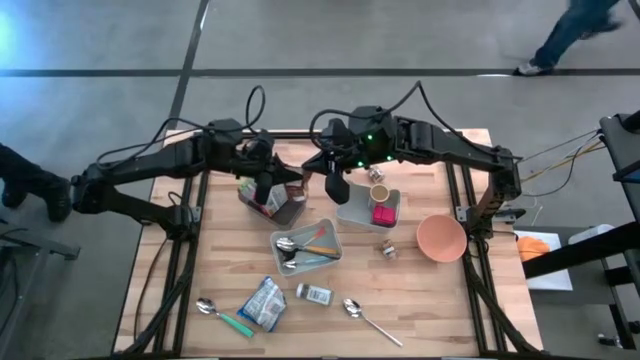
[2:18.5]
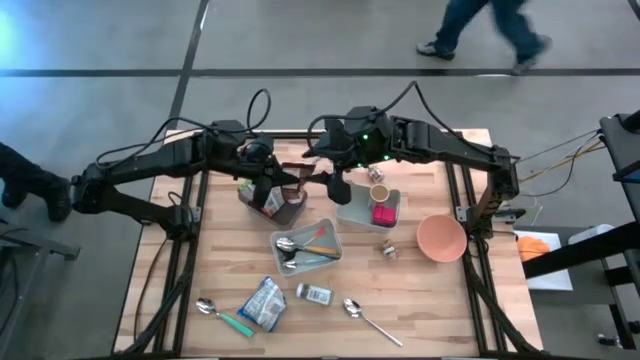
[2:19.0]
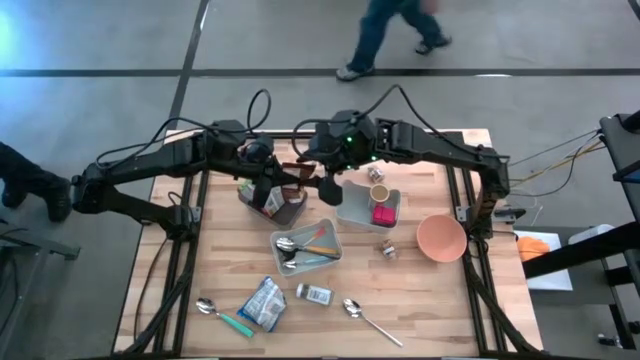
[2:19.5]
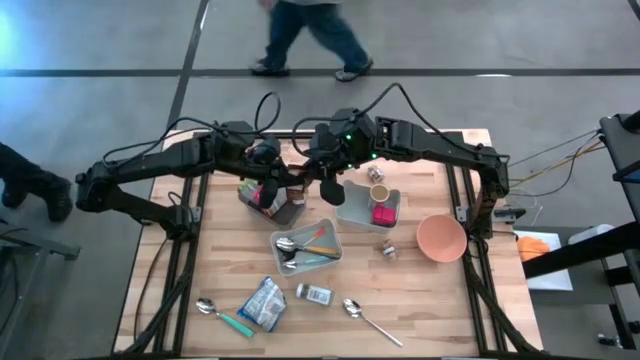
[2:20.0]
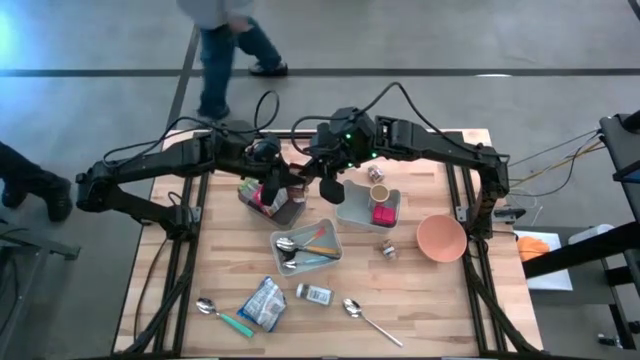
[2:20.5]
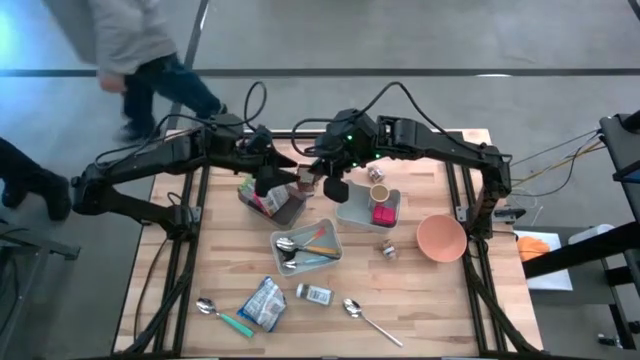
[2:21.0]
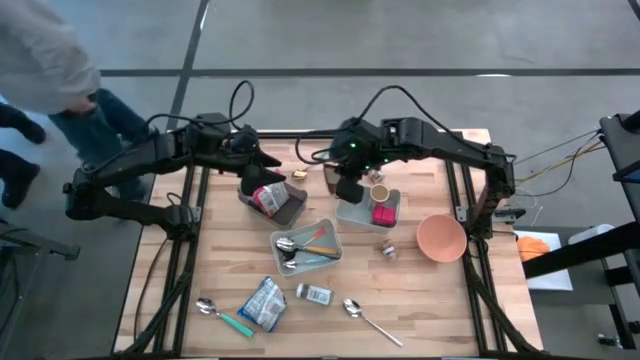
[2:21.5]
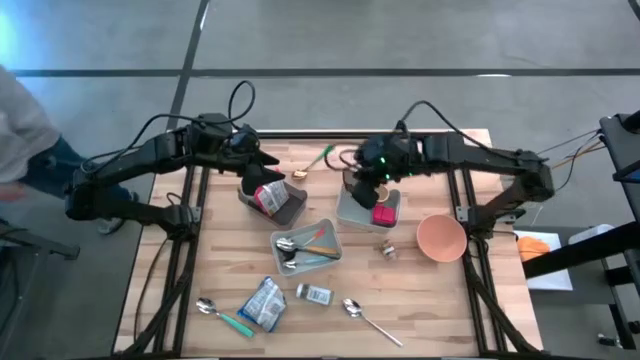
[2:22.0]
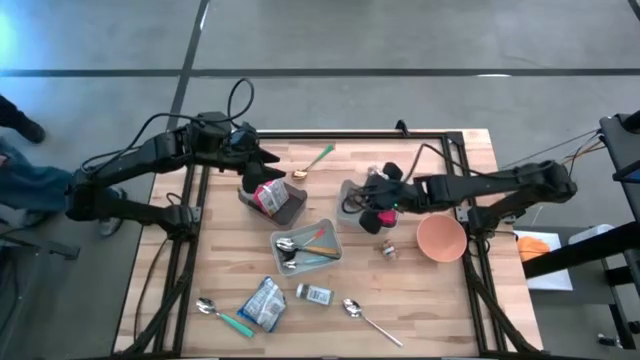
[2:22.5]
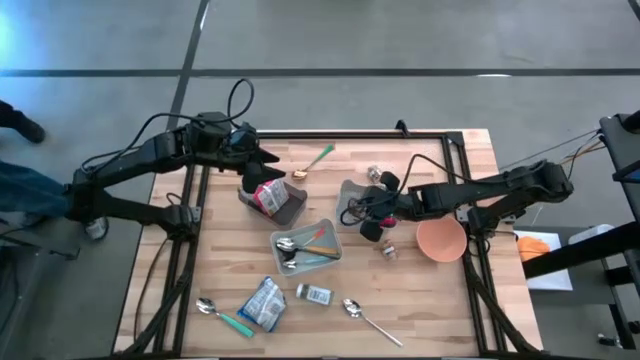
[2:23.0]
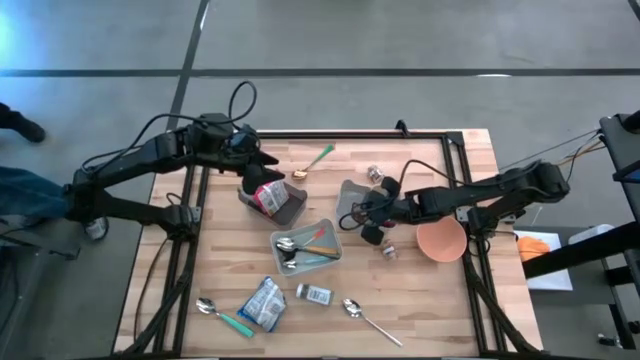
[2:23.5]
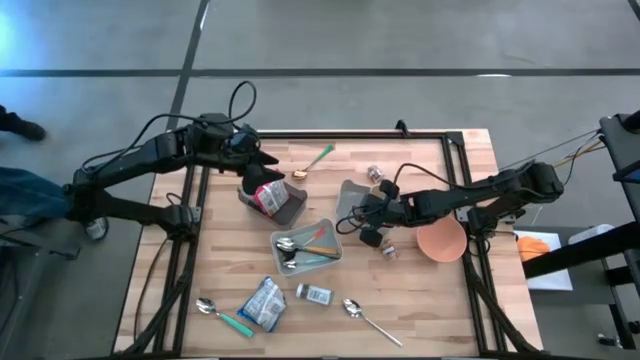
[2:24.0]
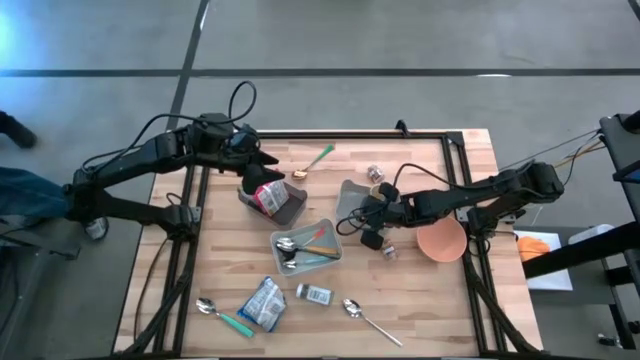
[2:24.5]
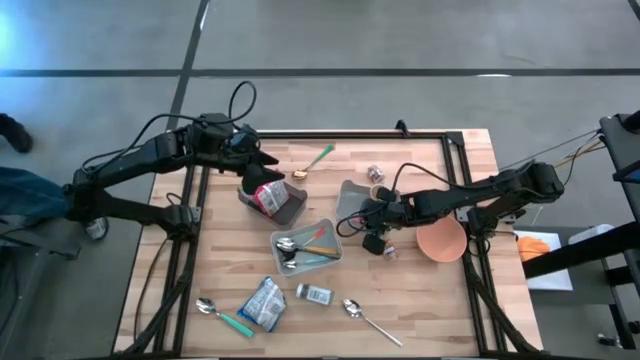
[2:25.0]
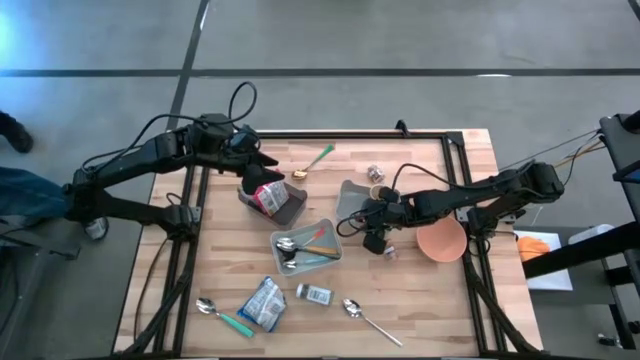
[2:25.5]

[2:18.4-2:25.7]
Put the orange seasoning pack into the top gray bin

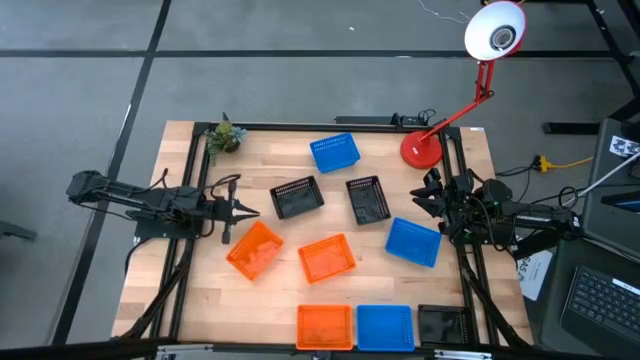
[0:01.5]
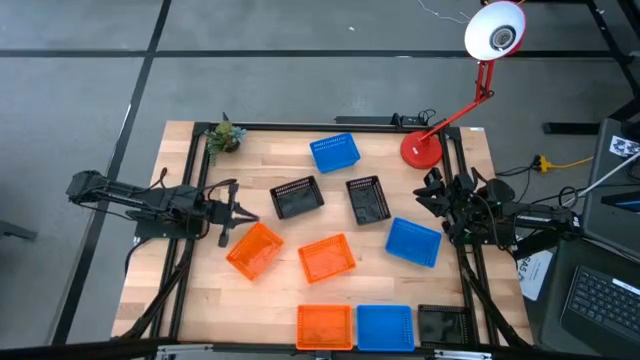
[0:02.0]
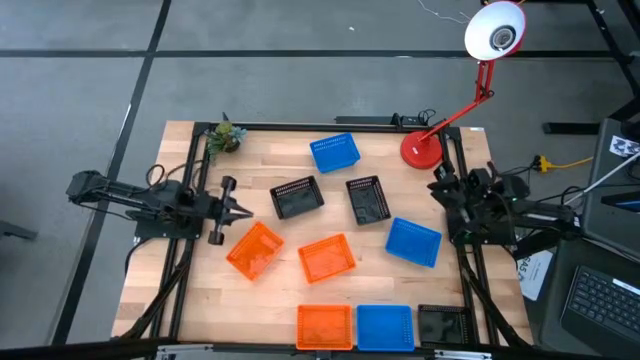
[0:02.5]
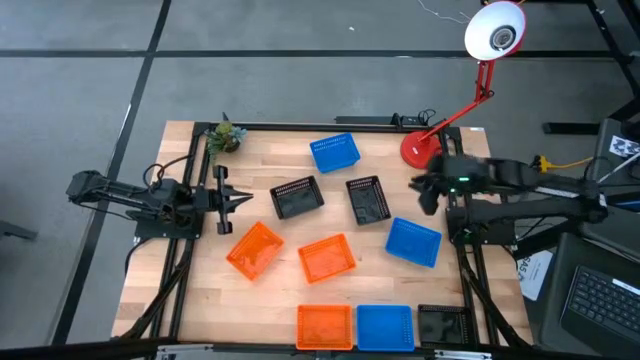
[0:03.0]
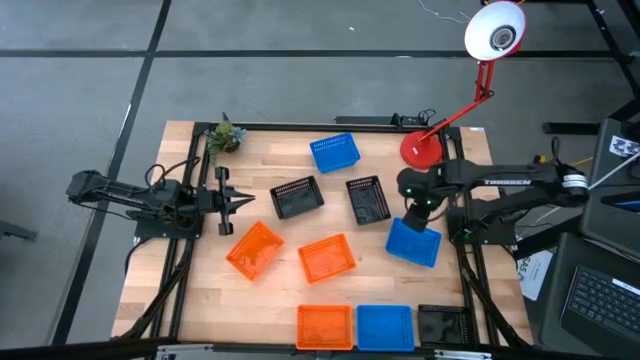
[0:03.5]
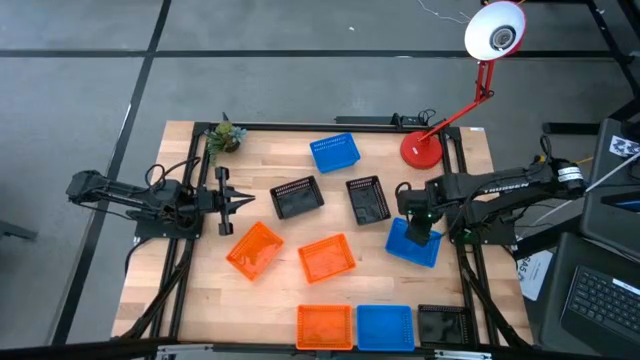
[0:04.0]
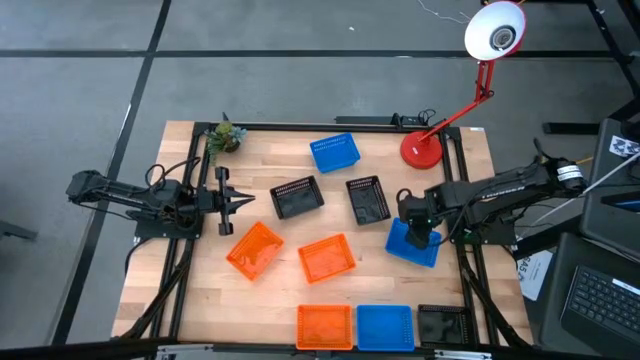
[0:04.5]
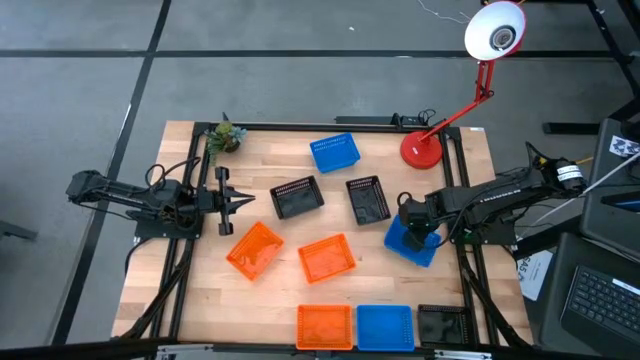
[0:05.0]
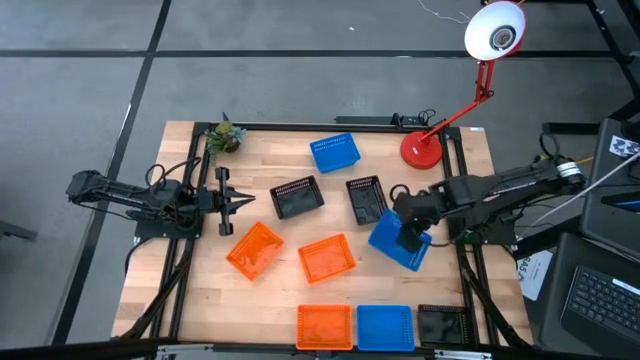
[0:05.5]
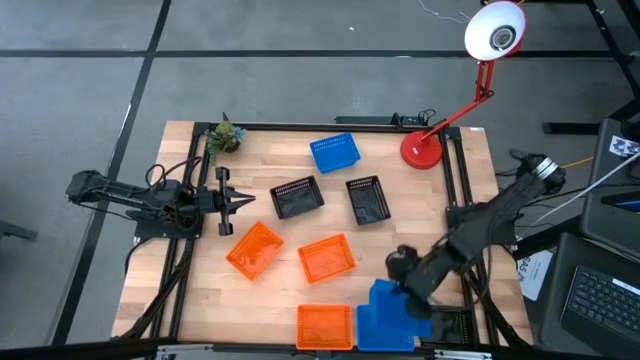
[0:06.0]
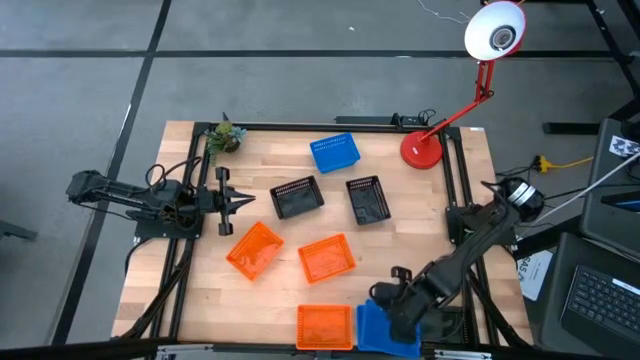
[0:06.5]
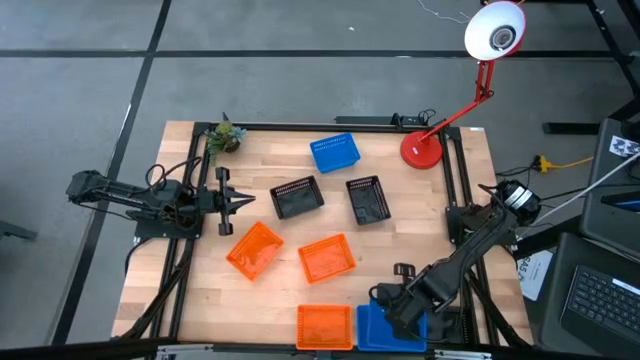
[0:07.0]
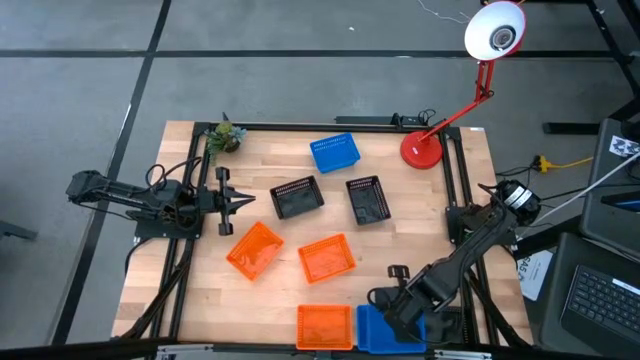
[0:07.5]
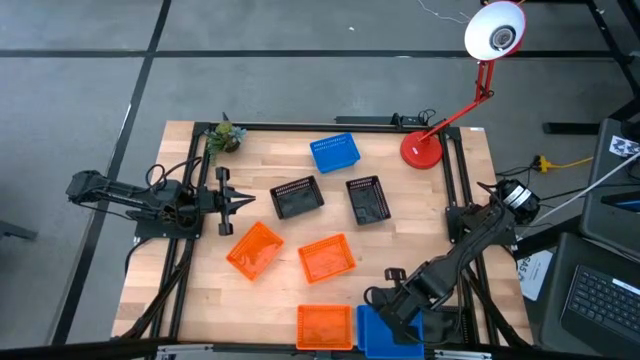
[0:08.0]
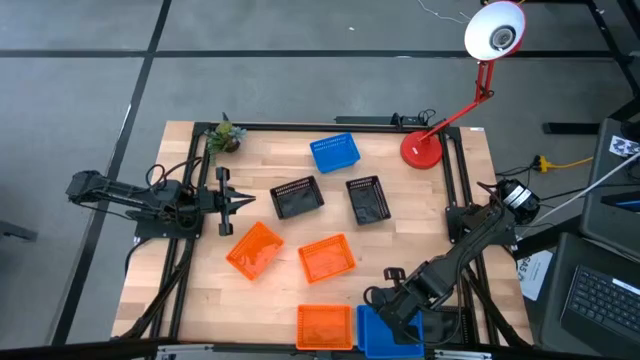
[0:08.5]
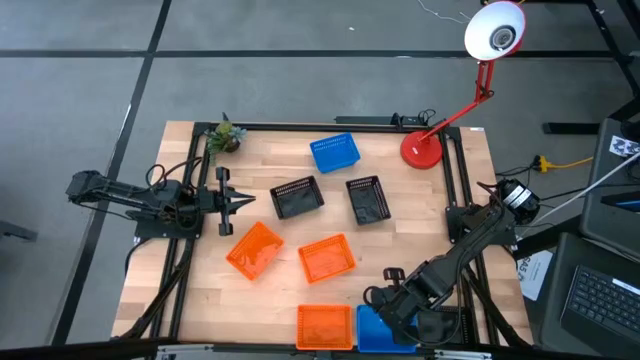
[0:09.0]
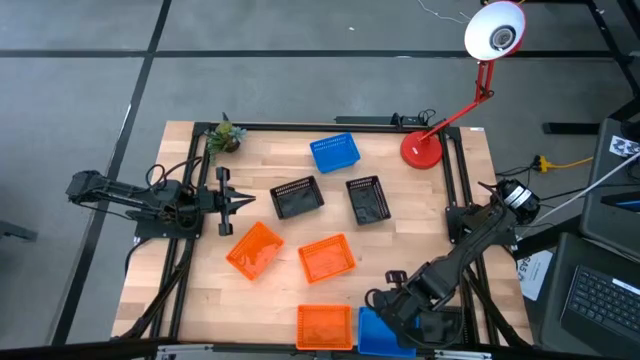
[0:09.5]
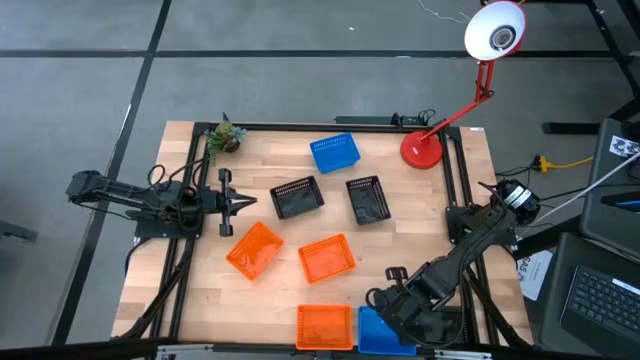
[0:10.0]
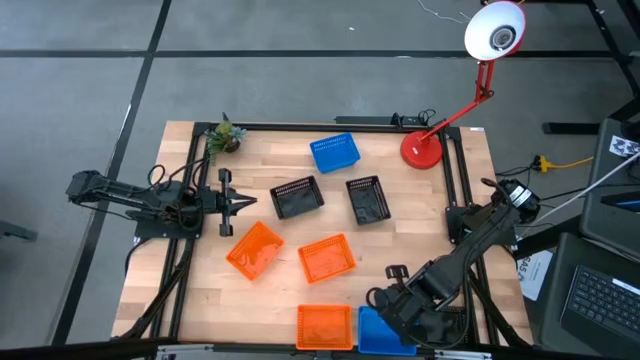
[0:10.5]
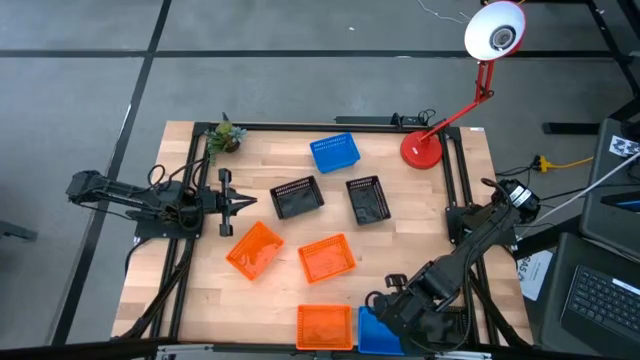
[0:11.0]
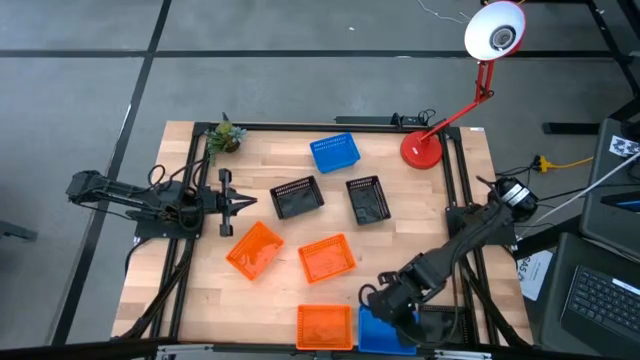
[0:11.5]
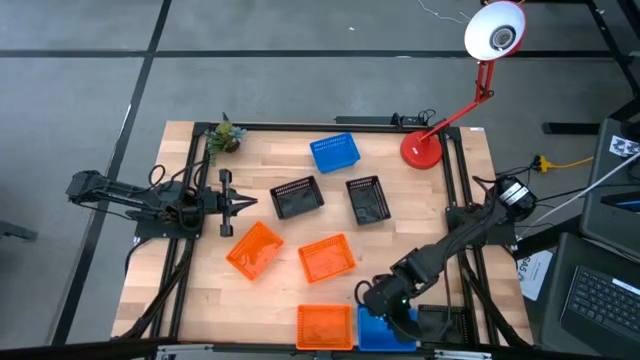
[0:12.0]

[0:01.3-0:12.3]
Stack the middle blue bin on the bottom blue bin
